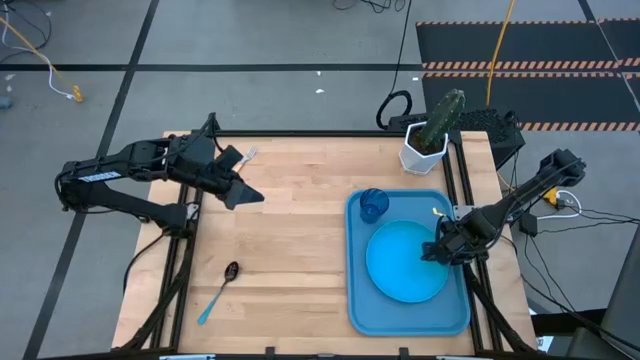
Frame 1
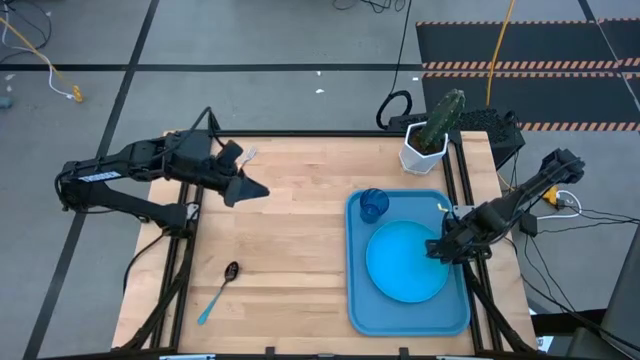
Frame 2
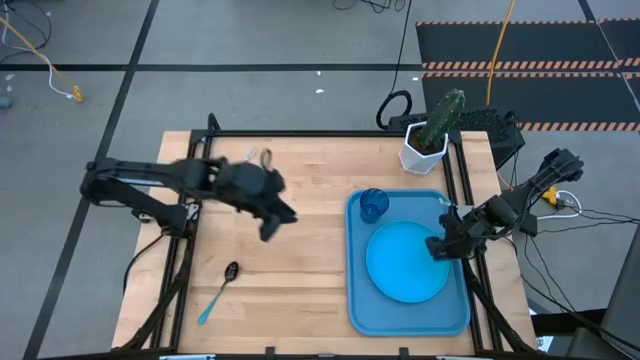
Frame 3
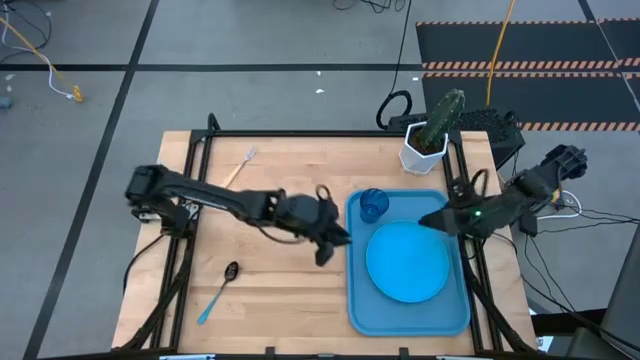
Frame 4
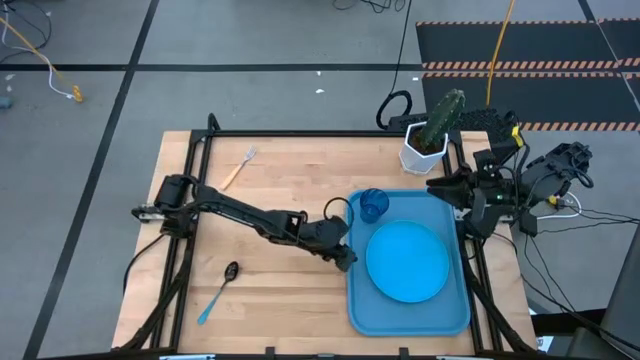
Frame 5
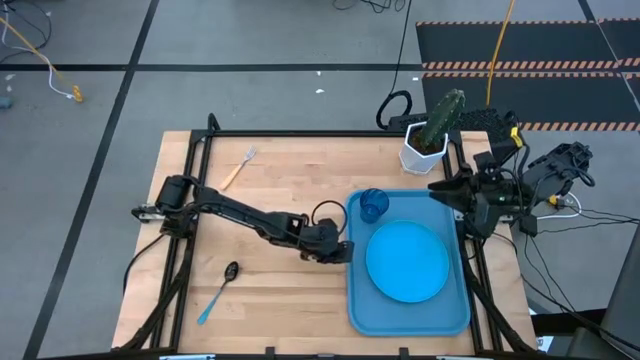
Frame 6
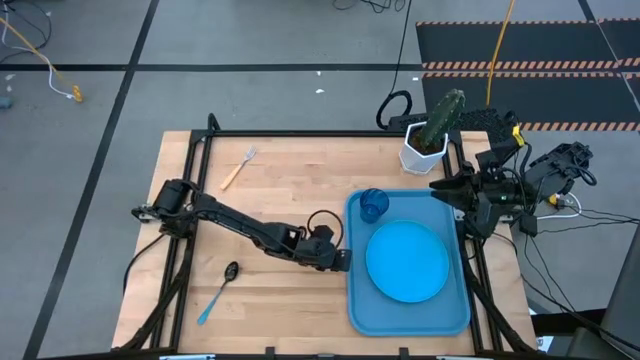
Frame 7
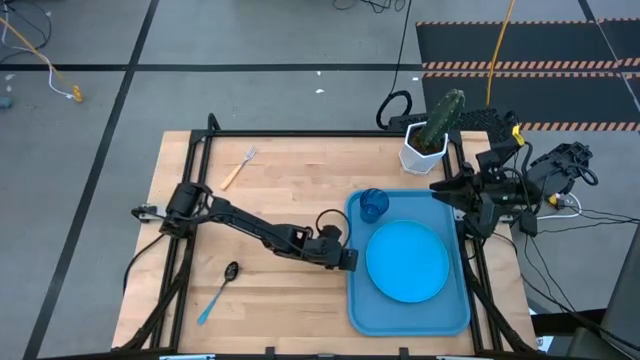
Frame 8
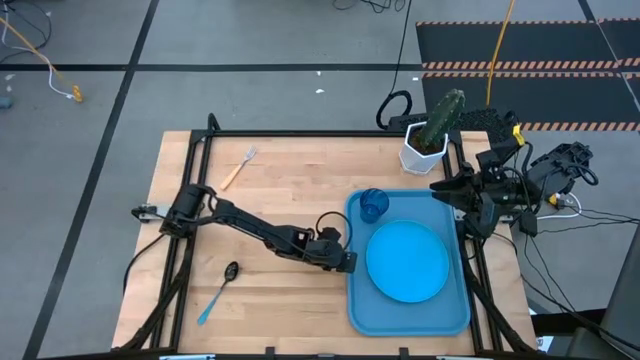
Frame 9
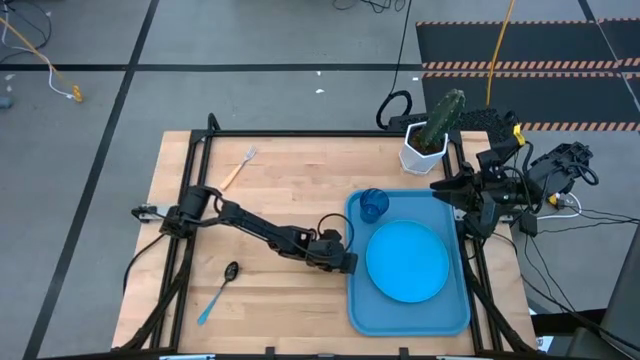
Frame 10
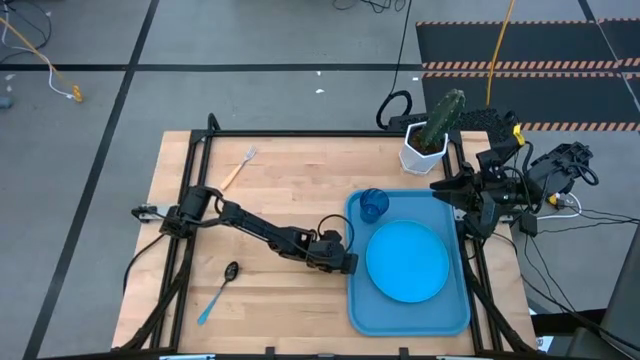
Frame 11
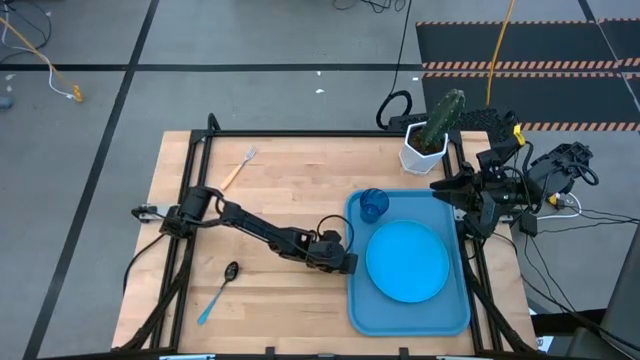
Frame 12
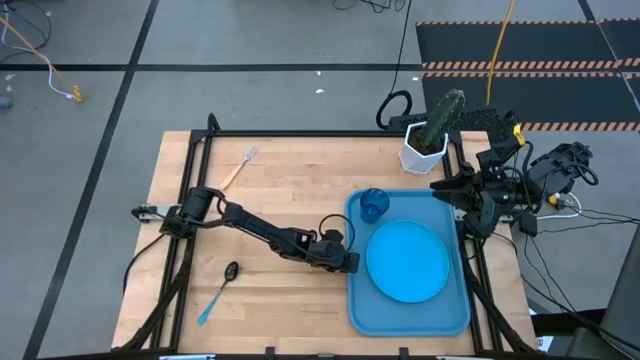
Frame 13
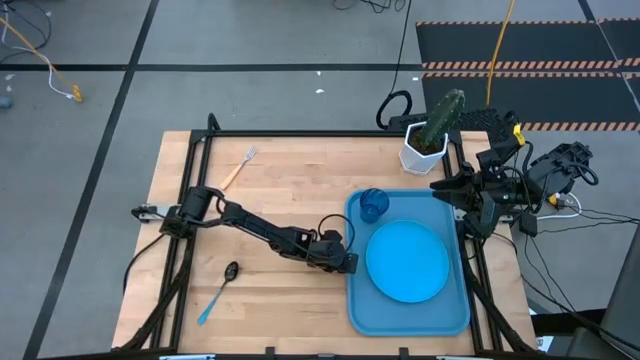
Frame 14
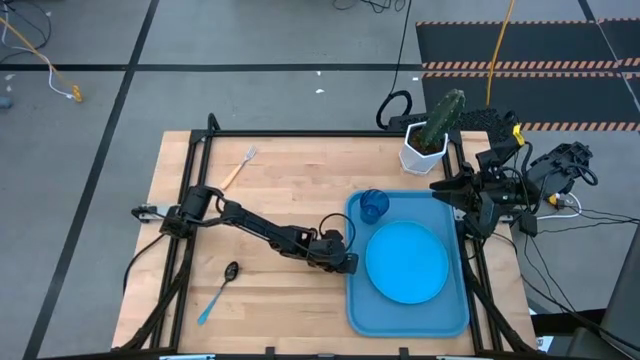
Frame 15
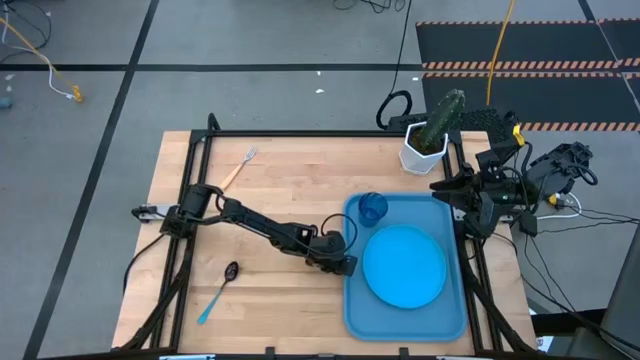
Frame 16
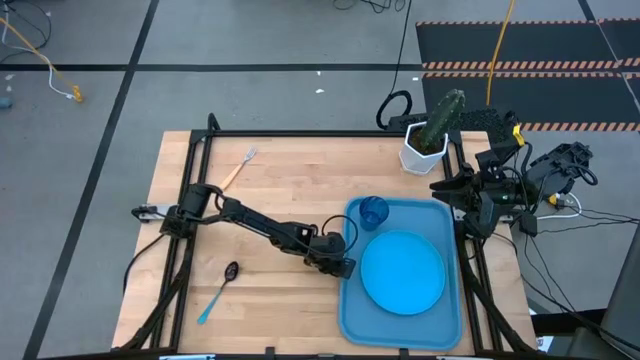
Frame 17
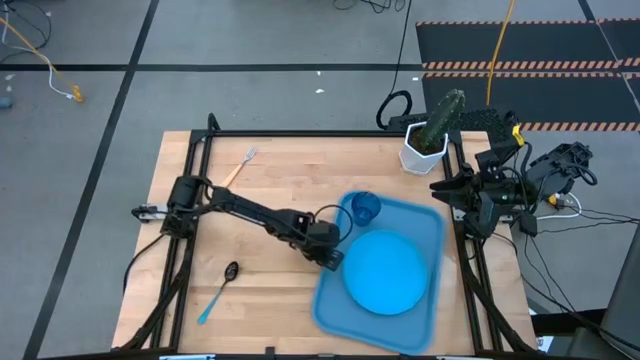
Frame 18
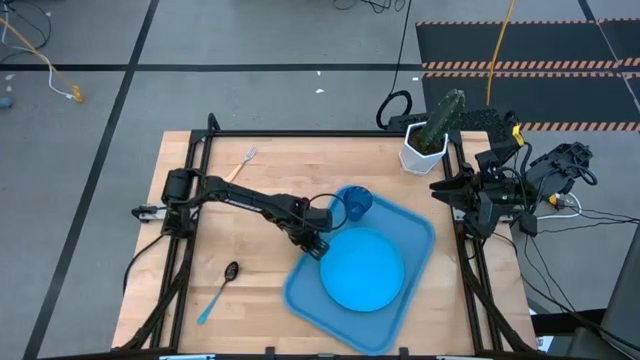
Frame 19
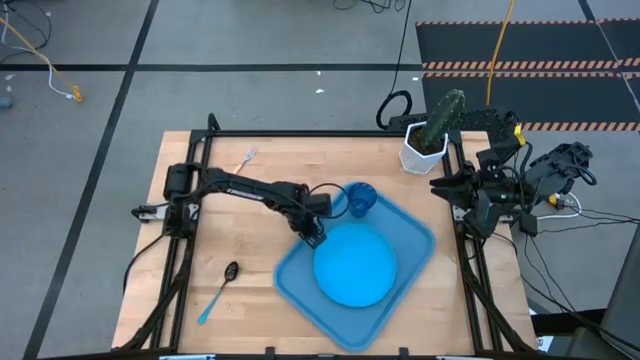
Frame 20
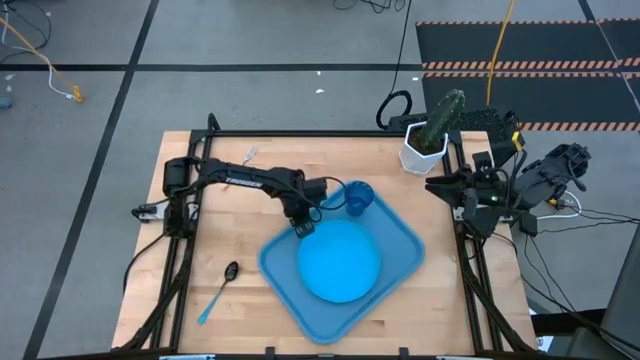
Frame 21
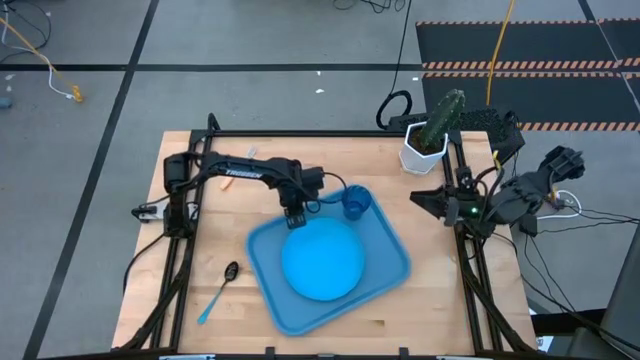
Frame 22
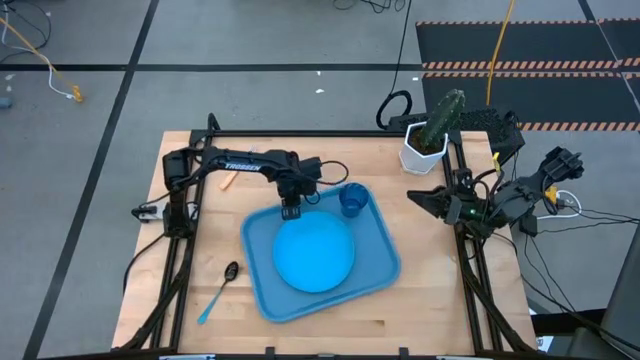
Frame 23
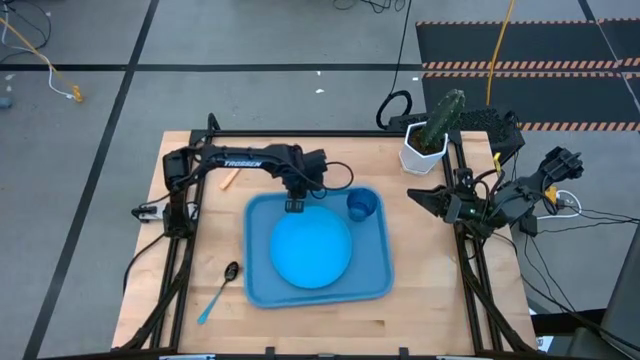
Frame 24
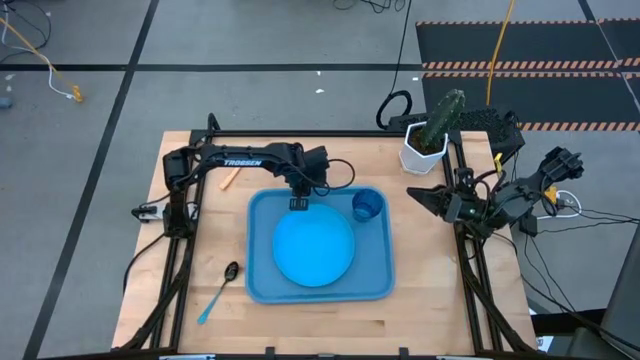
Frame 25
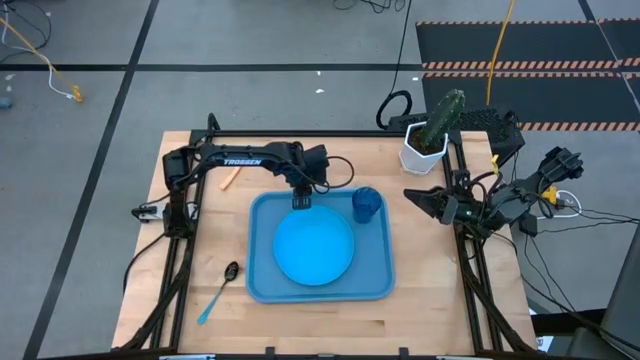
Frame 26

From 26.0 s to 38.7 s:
Task: Pick and place plate/cup/fork/spoon on tray
Move the blue tray to the center of the table

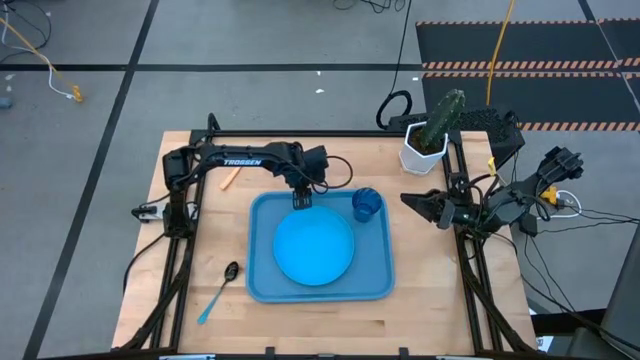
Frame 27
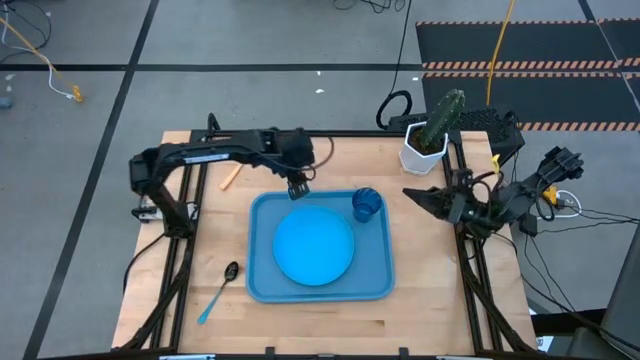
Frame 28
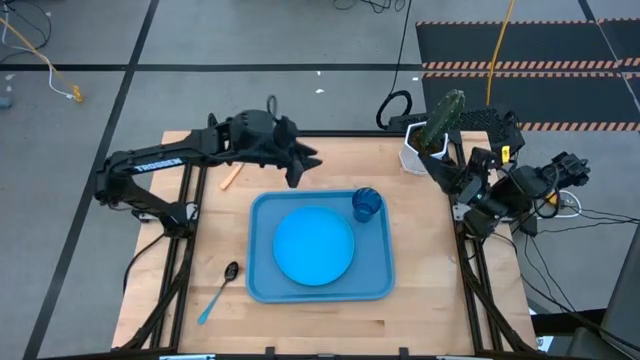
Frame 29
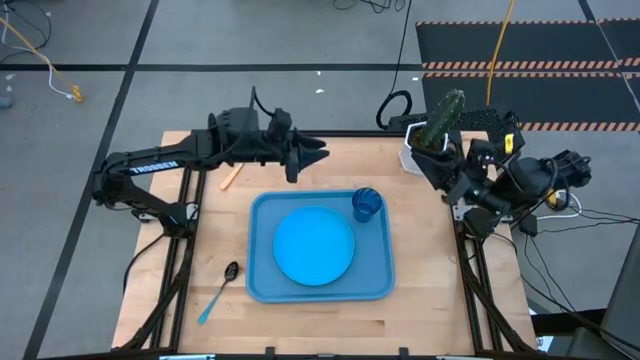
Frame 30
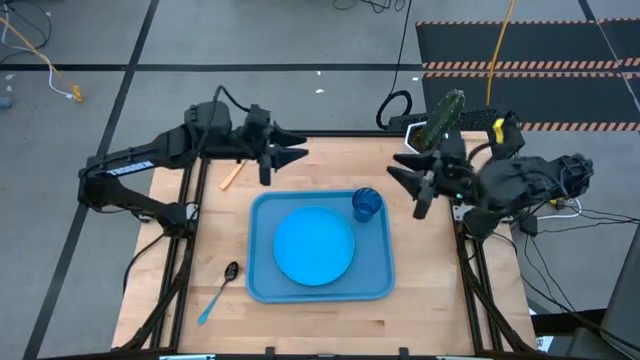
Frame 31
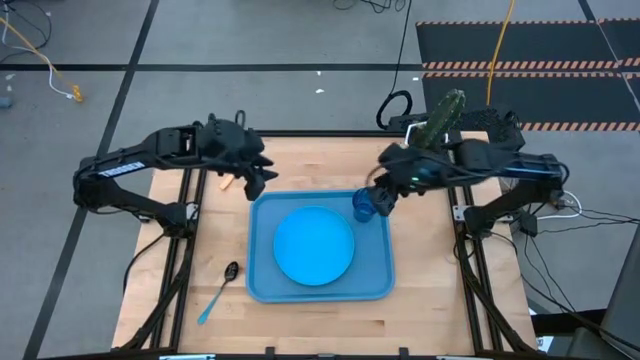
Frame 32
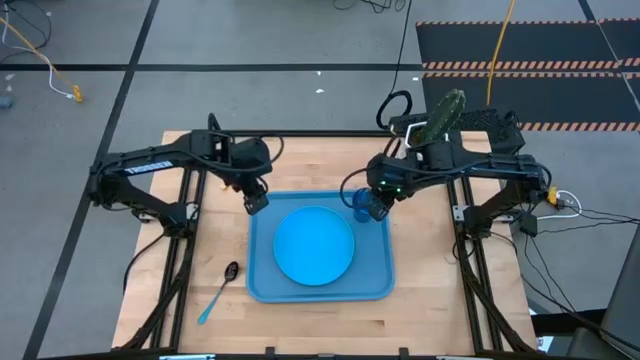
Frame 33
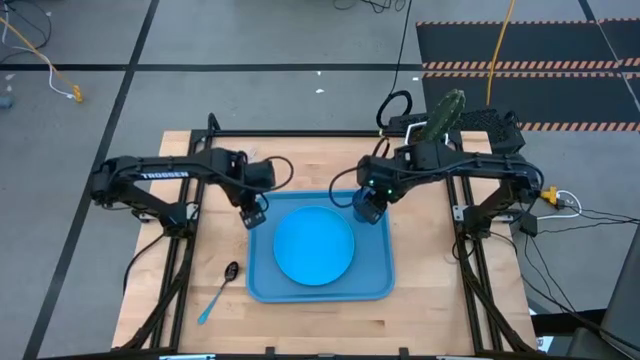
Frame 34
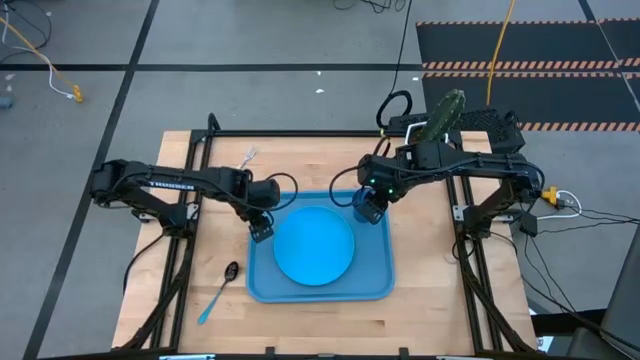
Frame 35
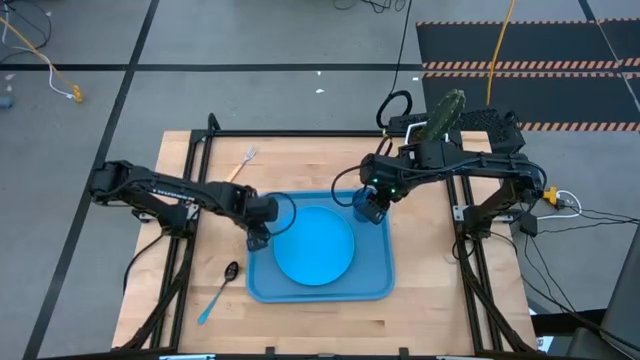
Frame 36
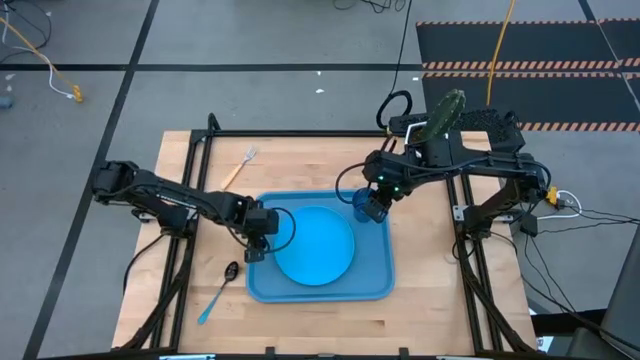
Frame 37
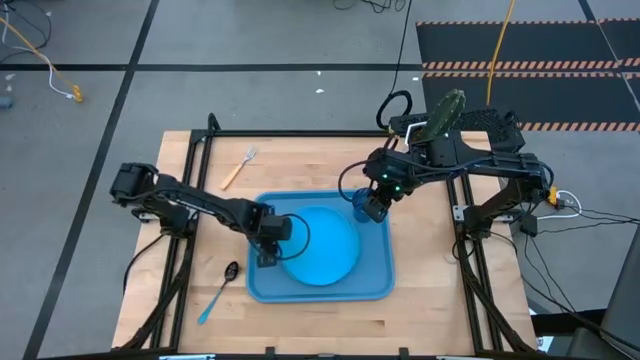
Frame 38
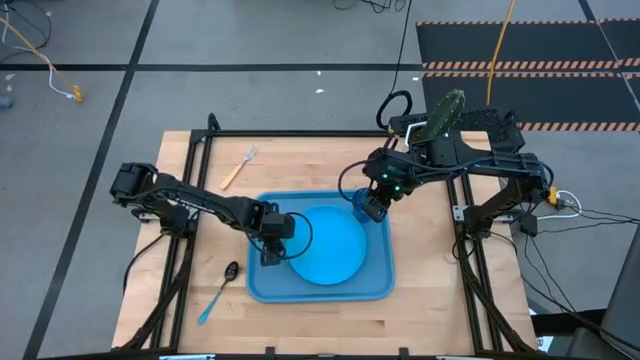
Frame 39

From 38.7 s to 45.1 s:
Adjust the light blue plate

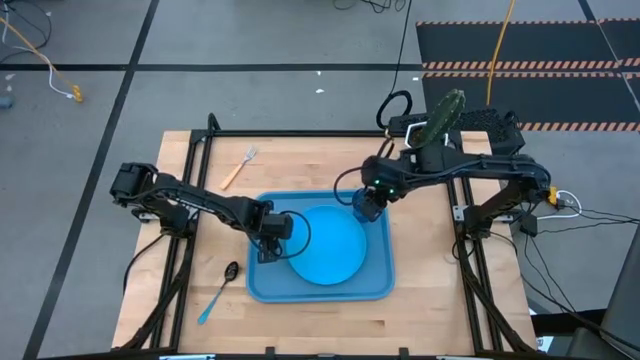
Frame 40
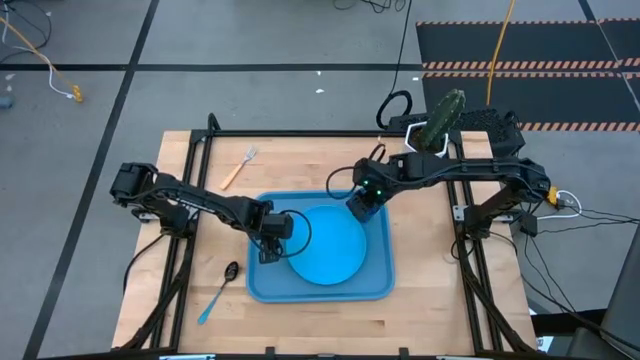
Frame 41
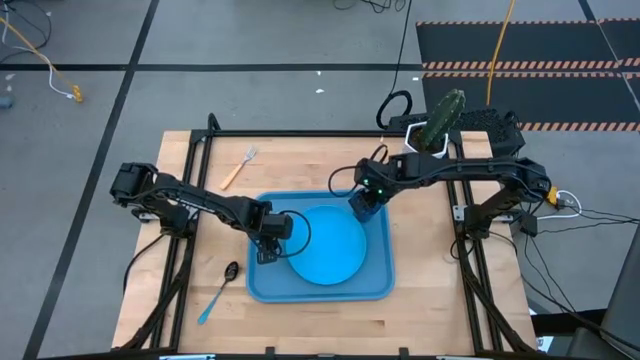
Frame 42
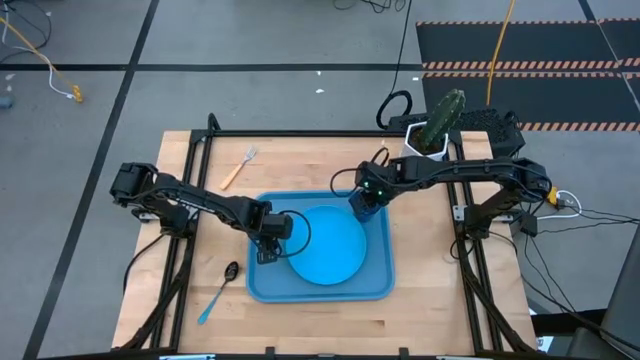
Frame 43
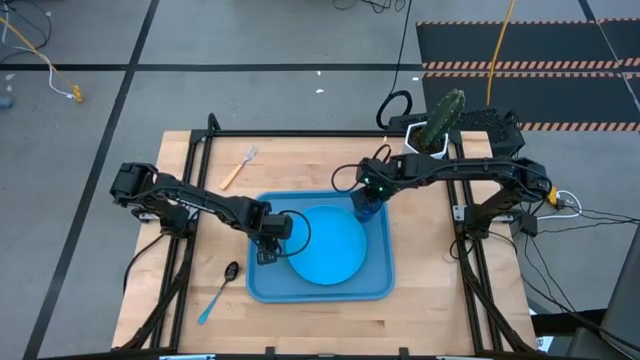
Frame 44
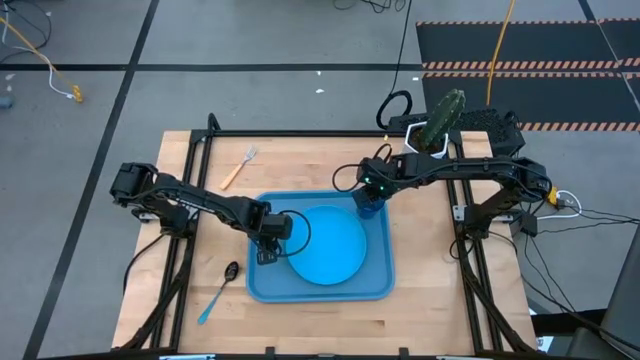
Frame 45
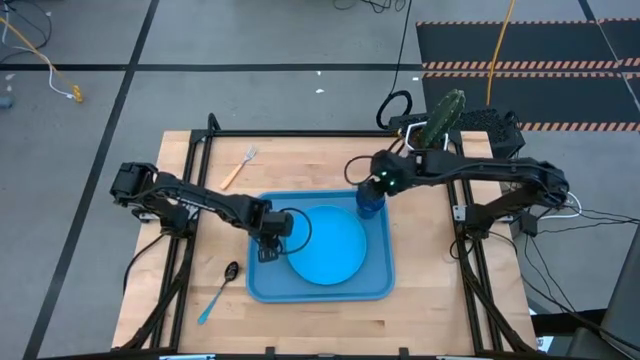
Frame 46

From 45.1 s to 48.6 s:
Adjust the dark blue cup
